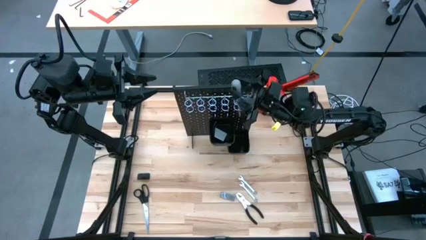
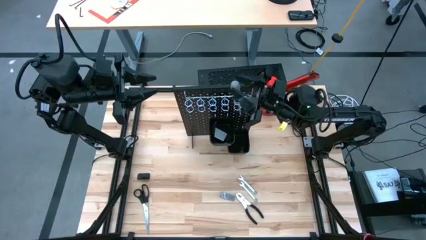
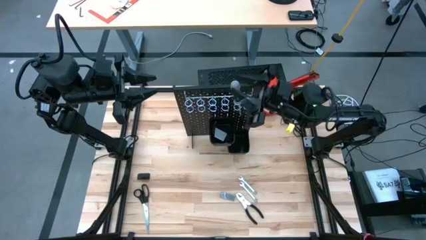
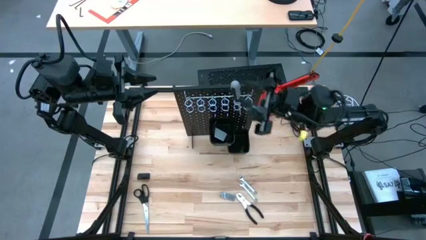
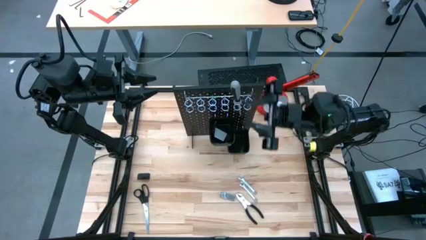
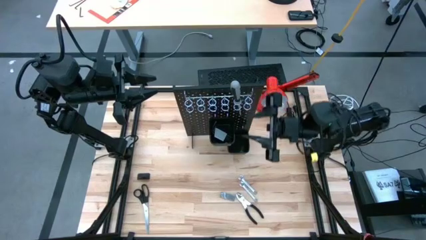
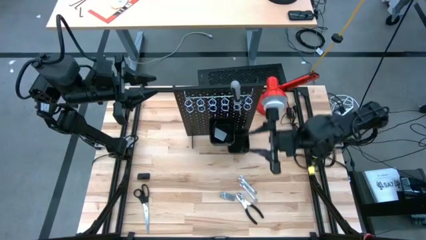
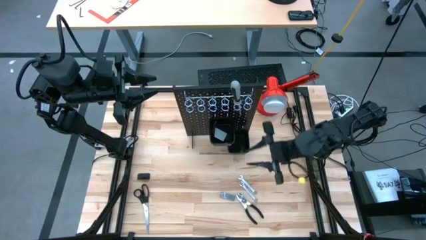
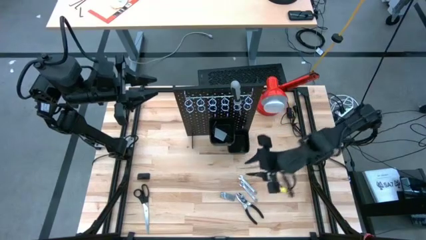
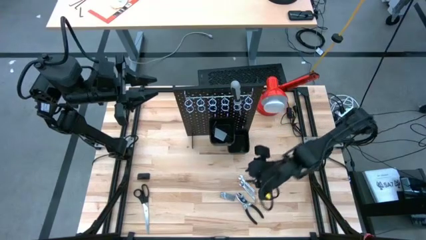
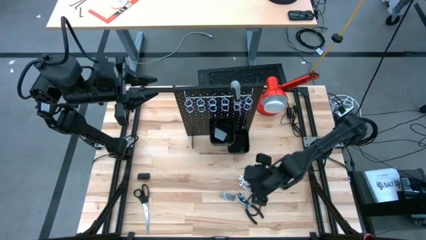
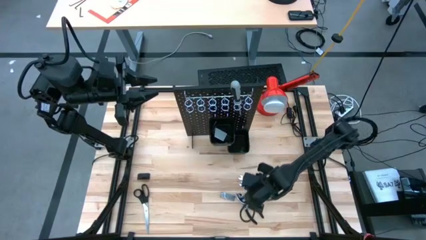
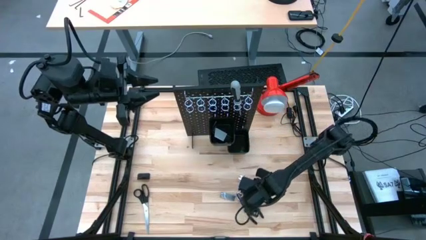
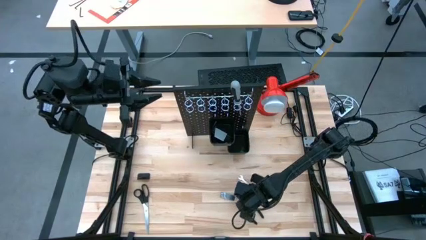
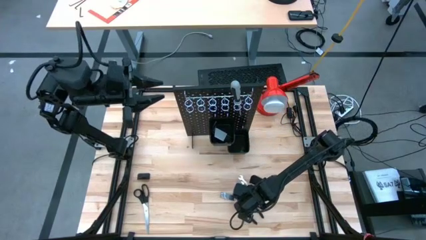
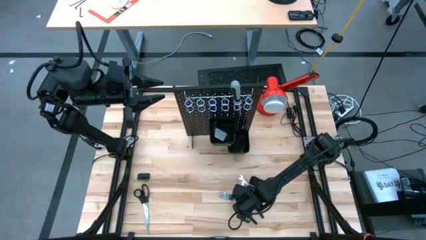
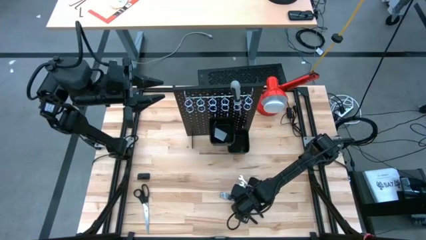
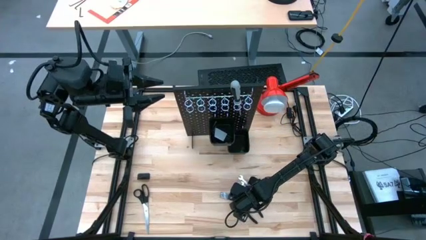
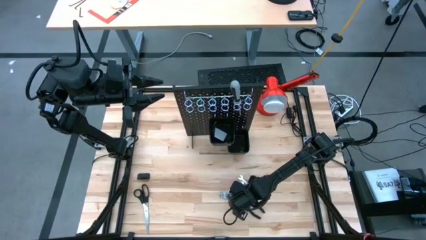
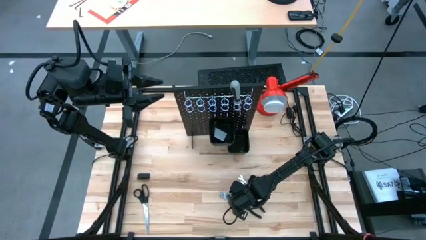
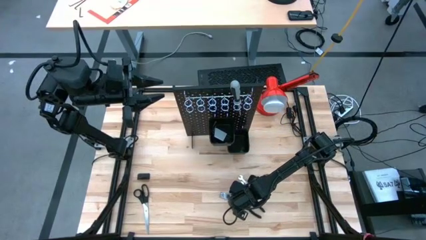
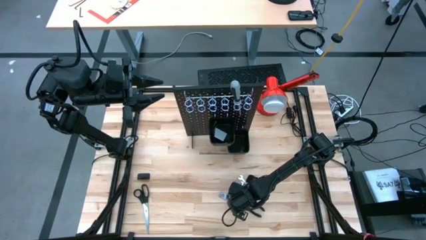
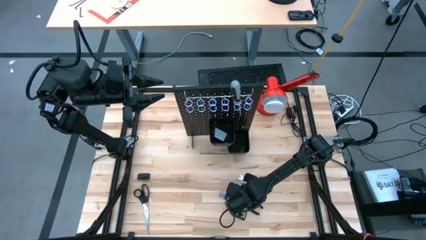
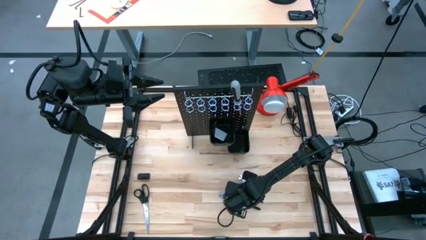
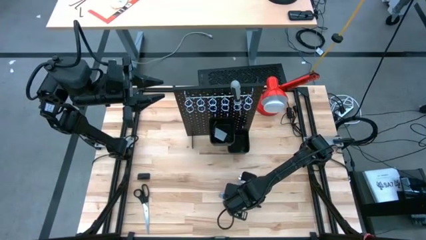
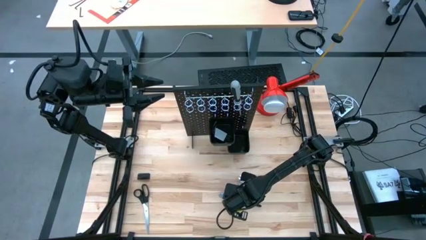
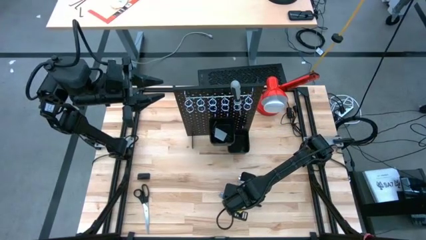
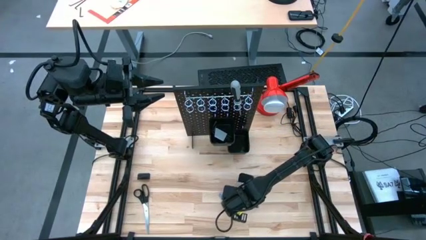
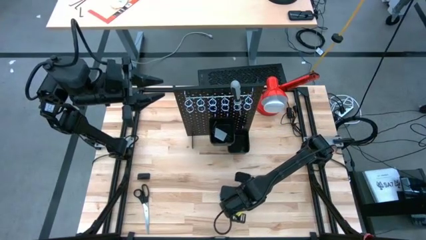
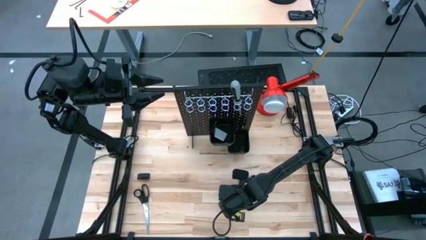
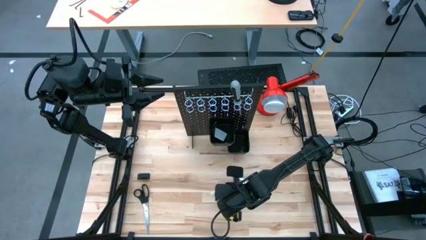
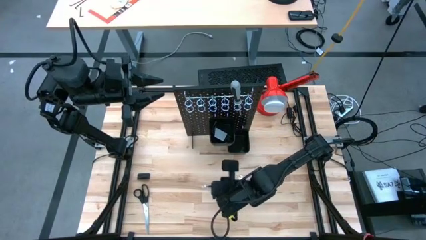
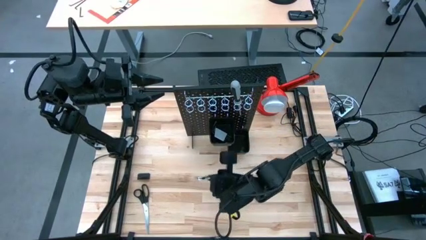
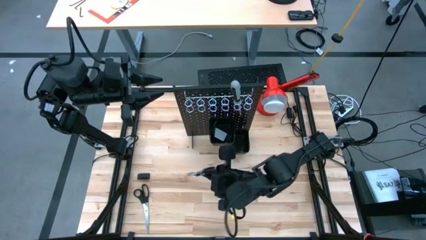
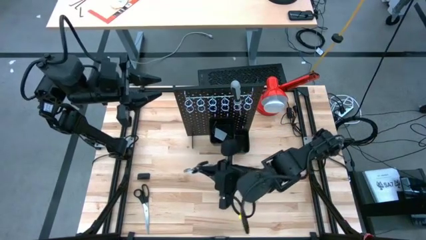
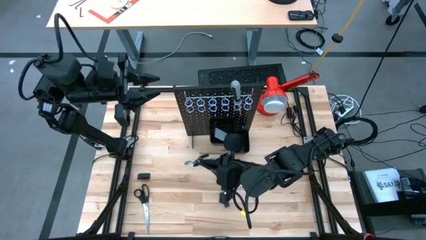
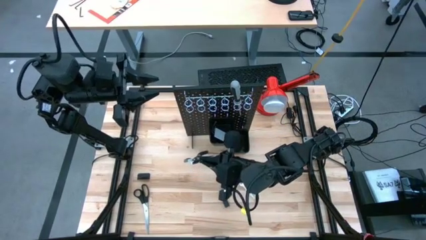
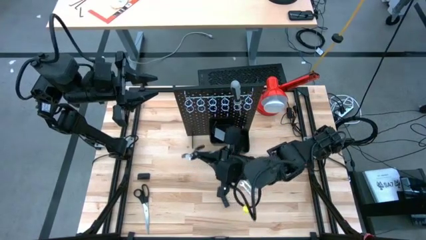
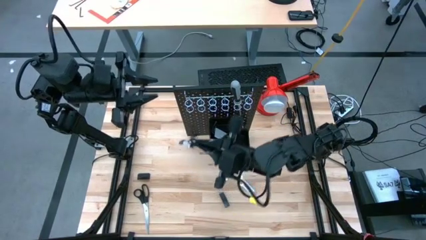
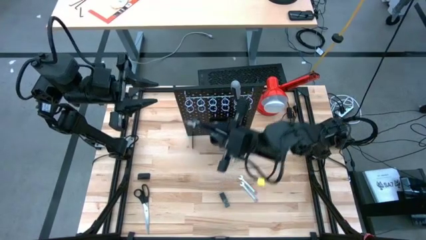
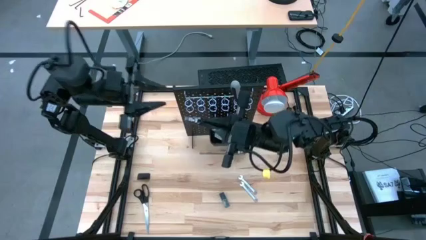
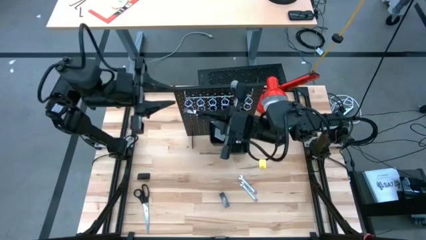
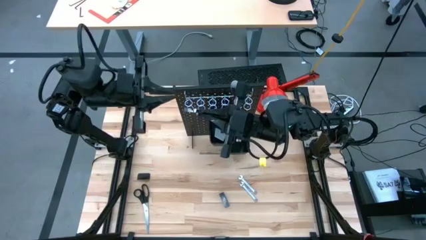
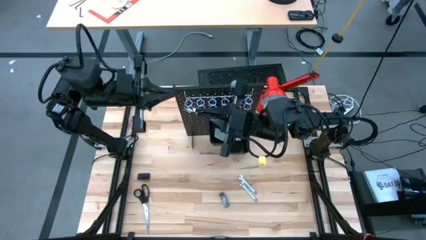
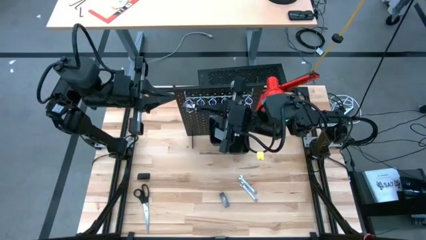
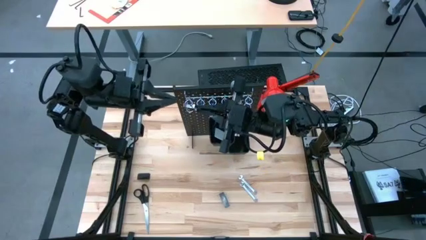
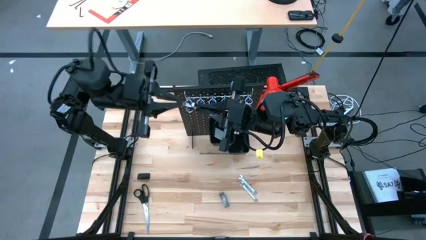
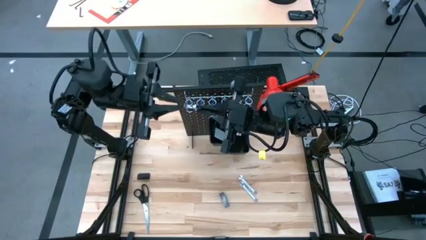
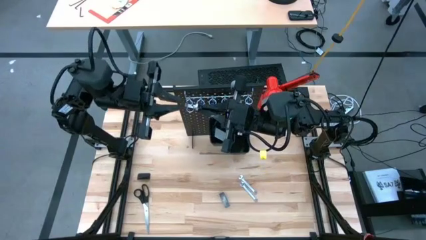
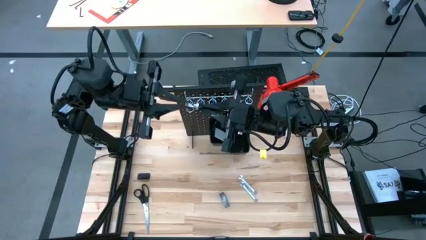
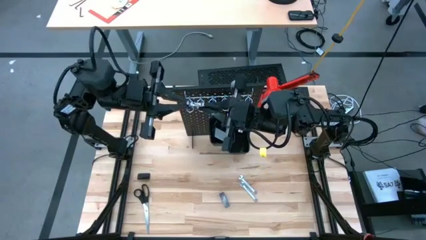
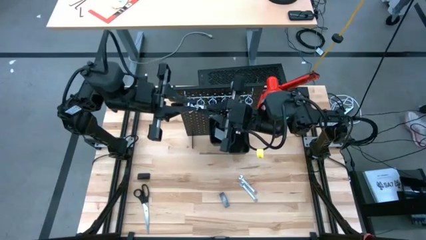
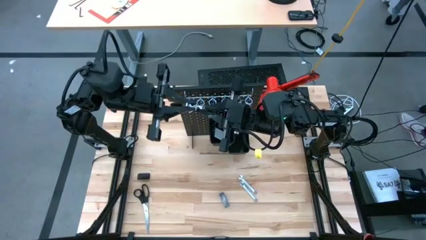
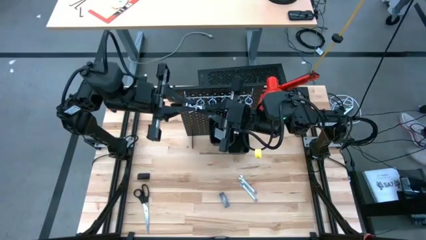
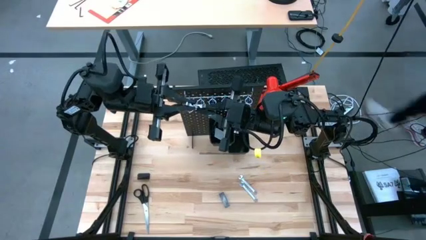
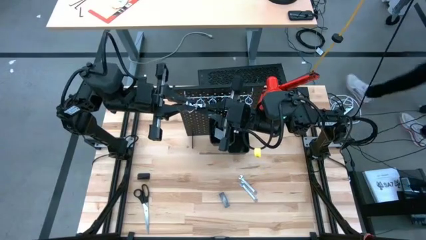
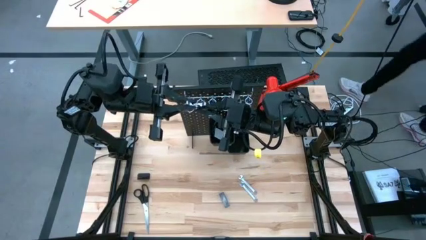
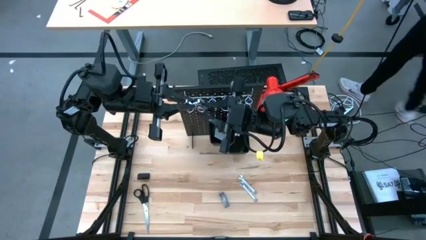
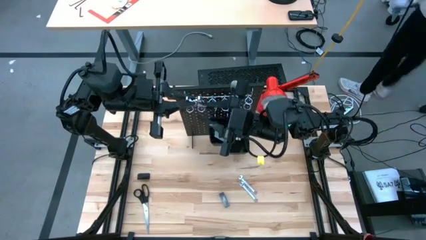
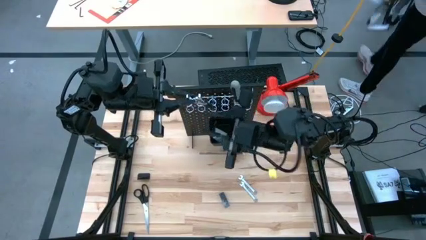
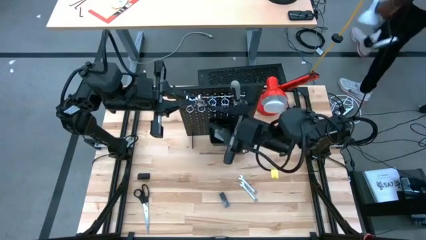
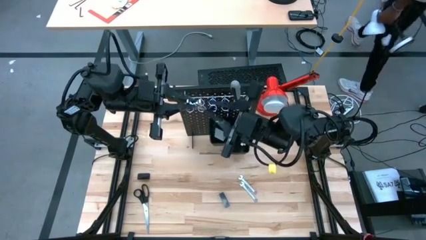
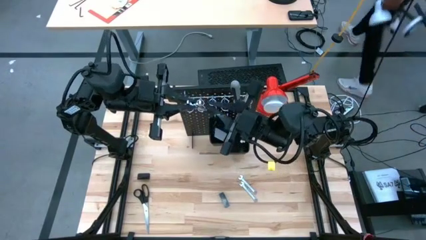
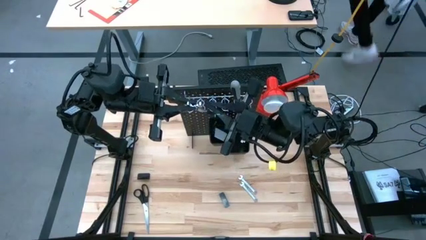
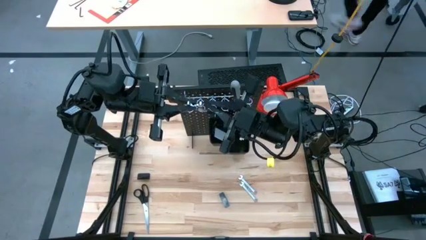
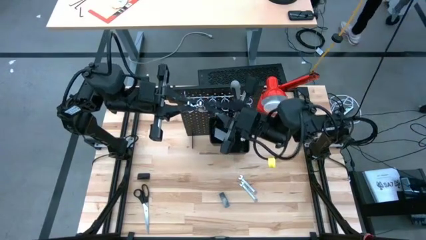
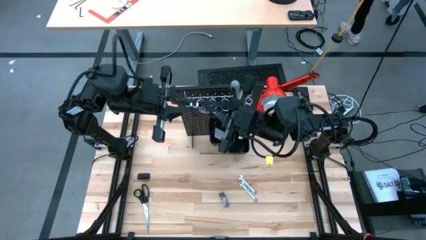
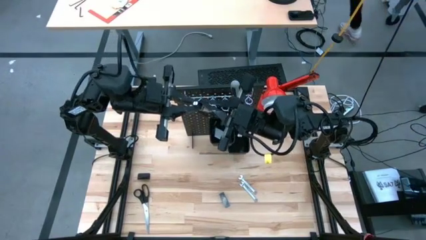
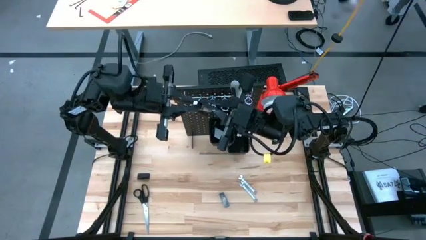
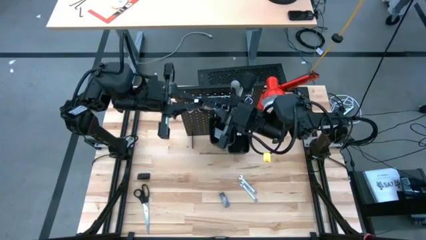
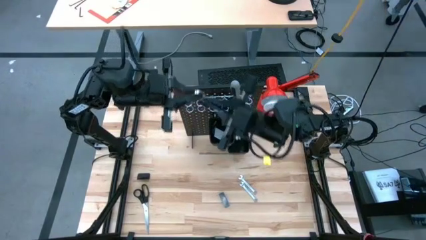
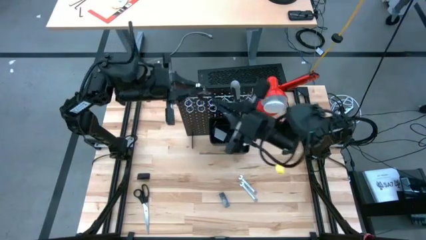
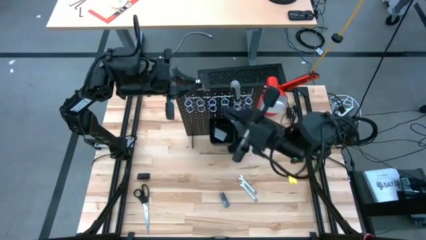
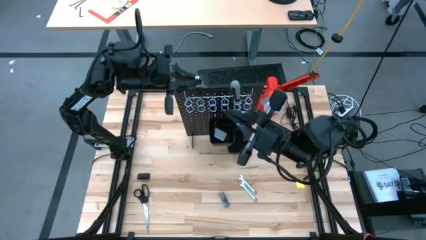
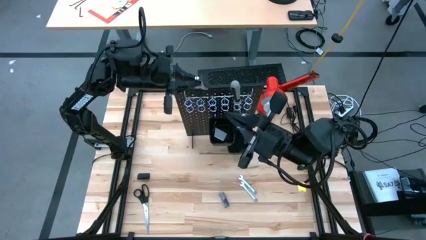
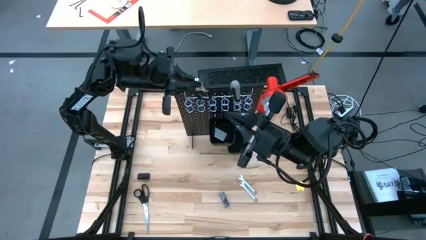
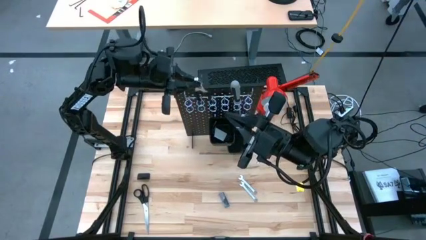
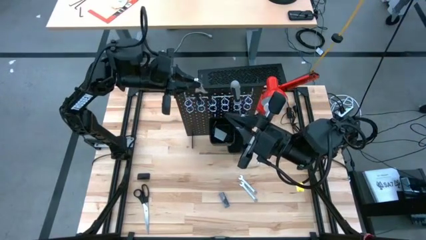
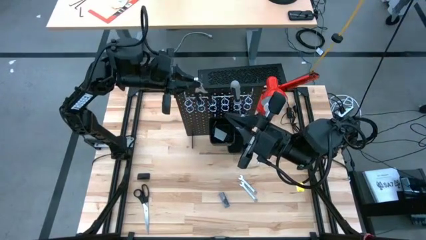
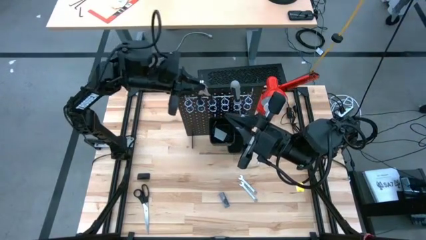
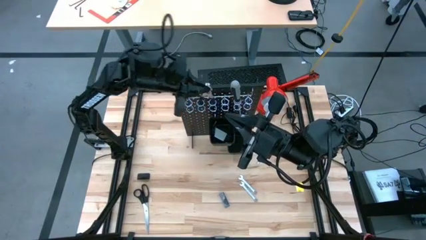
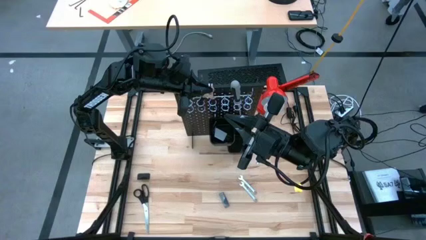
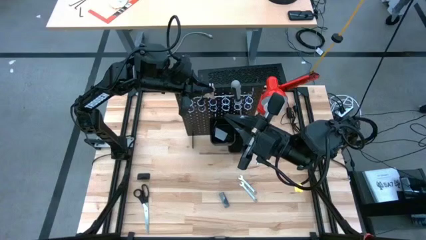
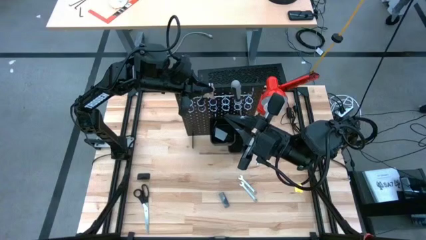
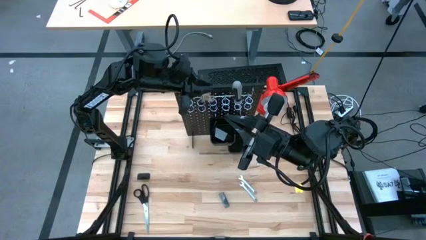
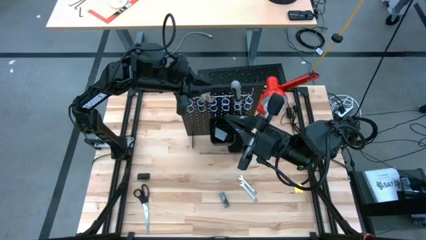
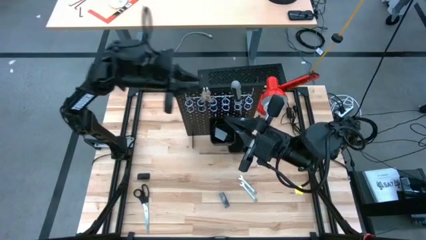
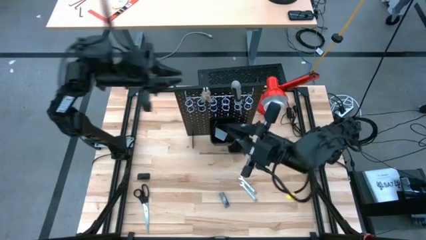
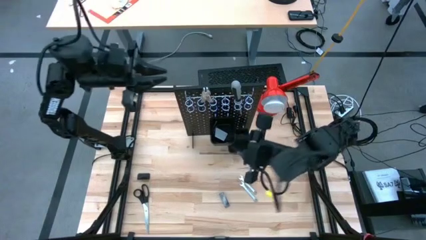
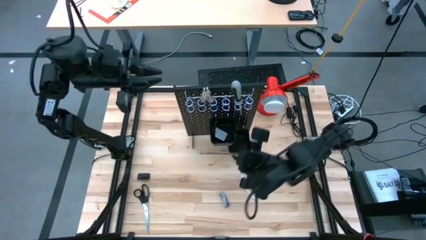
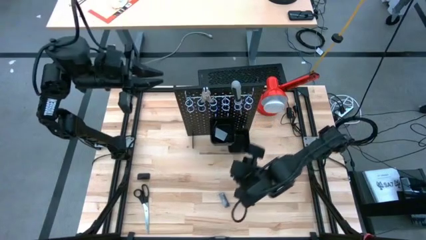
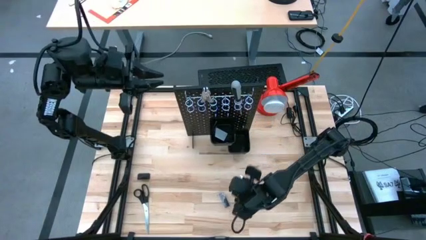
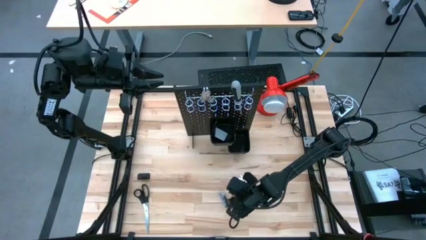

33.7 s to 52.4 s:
Task: Hang tools onto peg board
Hang the pliers on the pegboard
